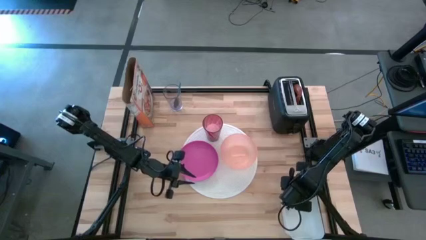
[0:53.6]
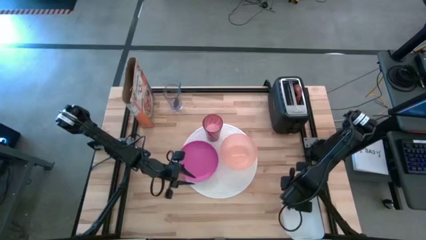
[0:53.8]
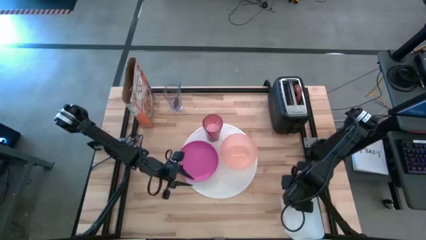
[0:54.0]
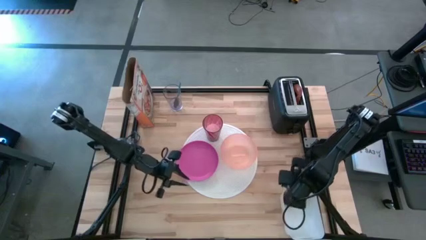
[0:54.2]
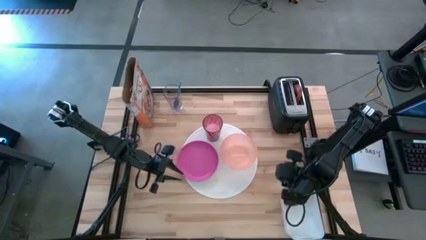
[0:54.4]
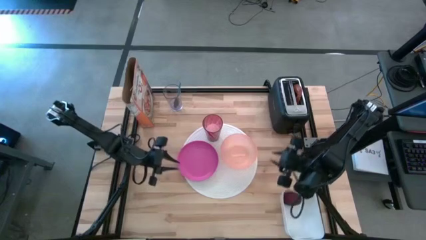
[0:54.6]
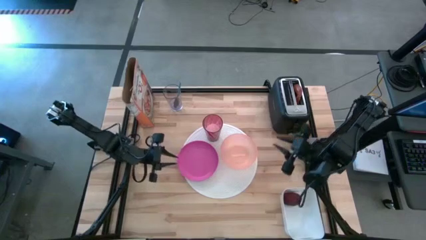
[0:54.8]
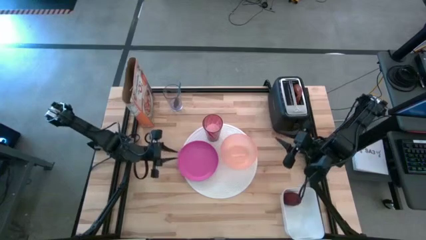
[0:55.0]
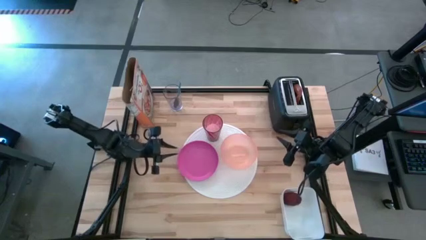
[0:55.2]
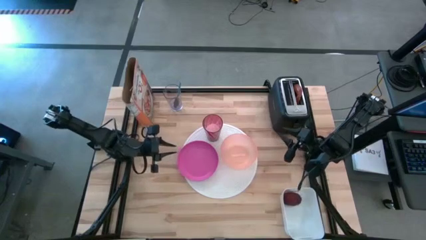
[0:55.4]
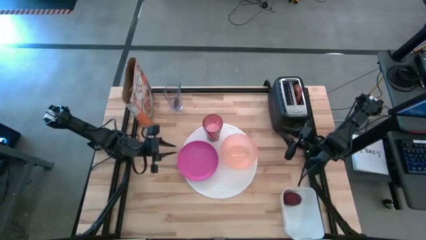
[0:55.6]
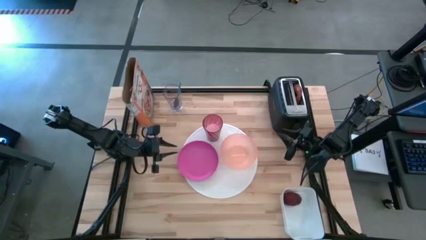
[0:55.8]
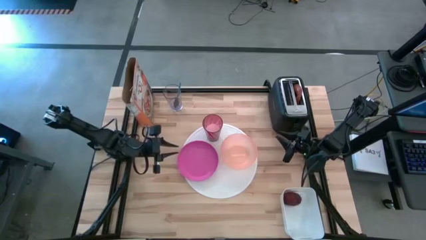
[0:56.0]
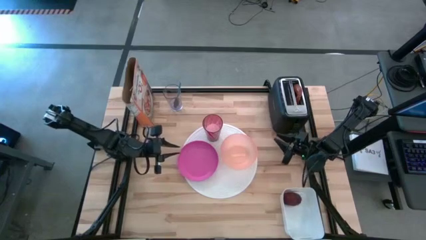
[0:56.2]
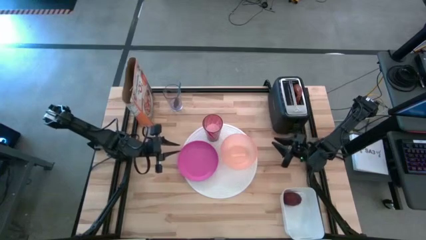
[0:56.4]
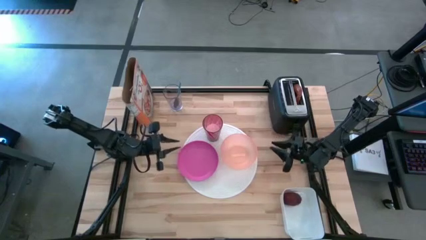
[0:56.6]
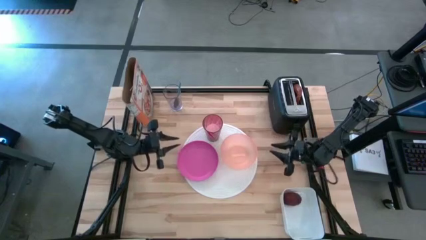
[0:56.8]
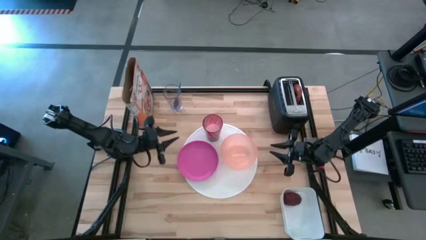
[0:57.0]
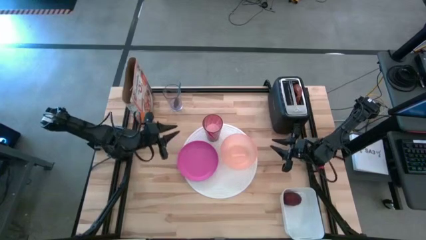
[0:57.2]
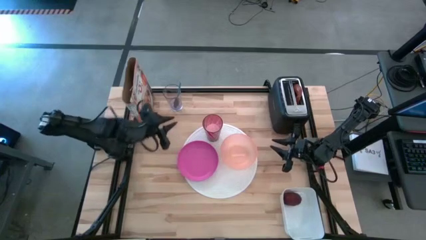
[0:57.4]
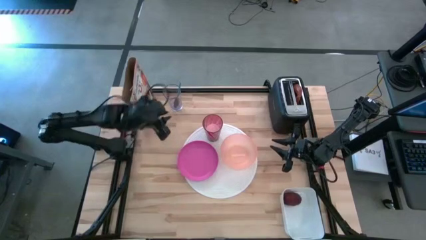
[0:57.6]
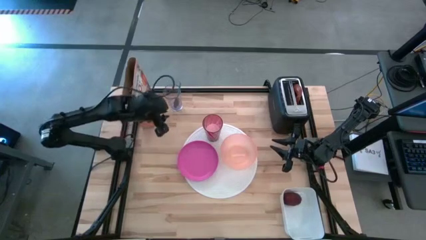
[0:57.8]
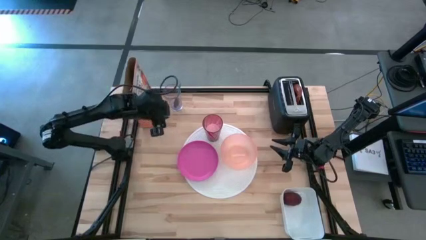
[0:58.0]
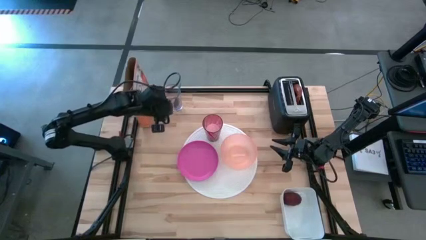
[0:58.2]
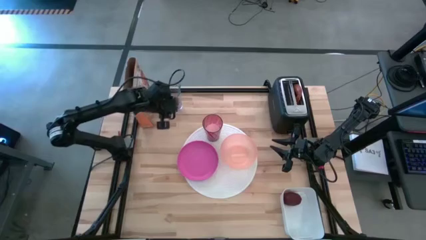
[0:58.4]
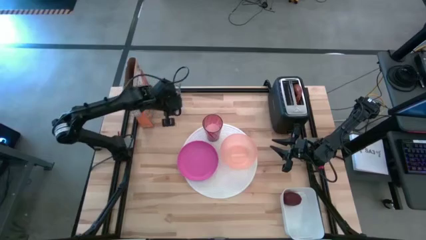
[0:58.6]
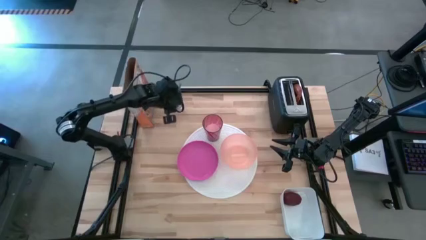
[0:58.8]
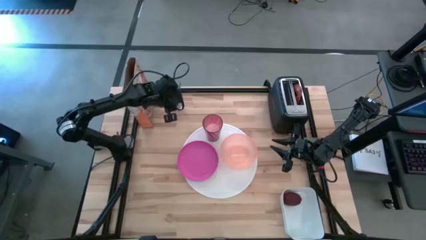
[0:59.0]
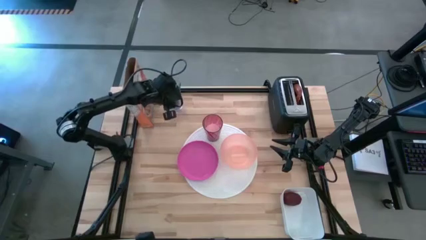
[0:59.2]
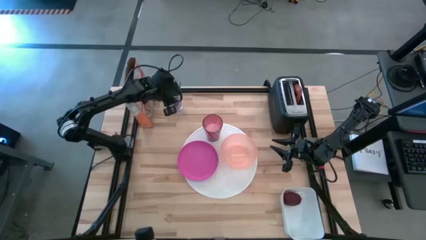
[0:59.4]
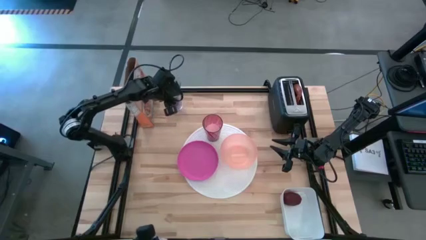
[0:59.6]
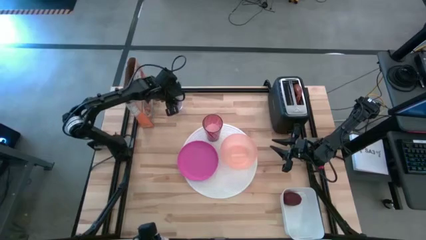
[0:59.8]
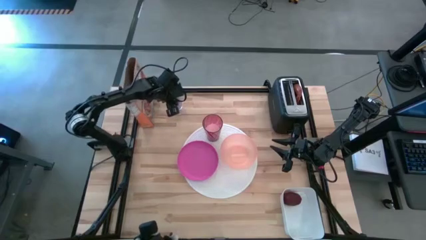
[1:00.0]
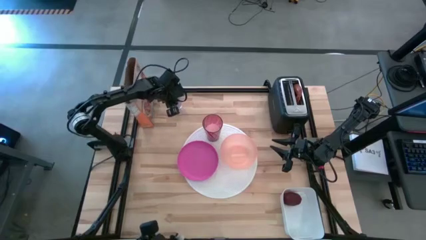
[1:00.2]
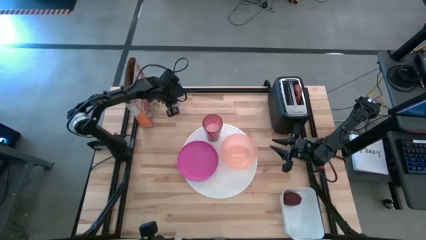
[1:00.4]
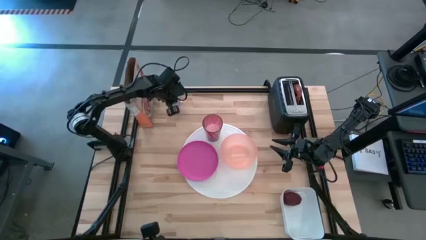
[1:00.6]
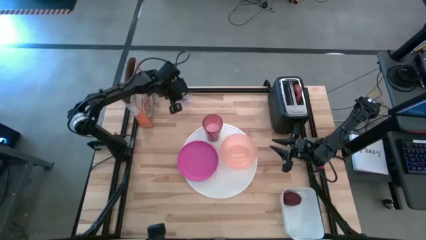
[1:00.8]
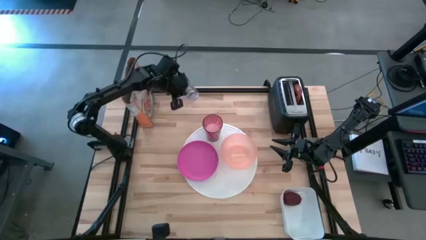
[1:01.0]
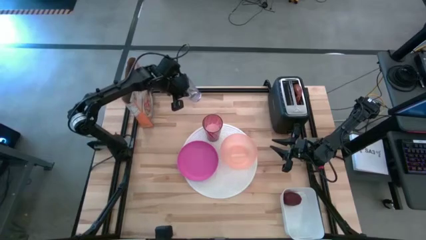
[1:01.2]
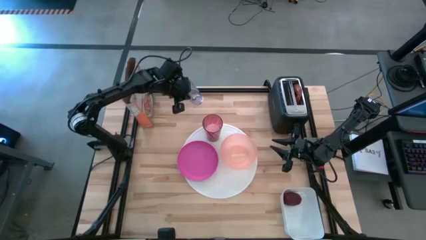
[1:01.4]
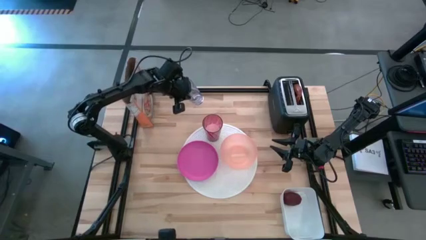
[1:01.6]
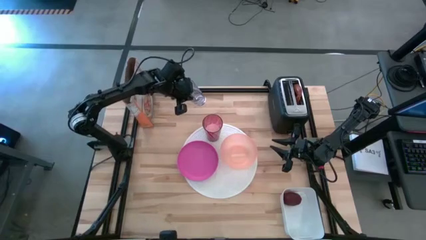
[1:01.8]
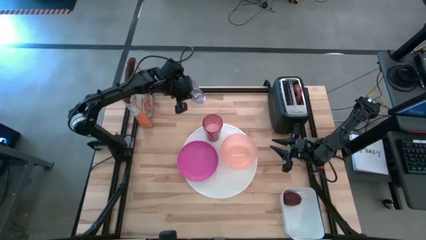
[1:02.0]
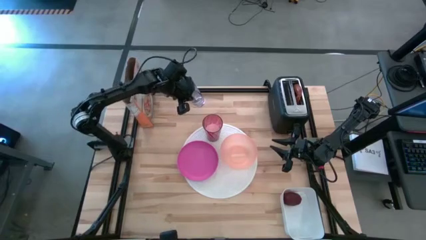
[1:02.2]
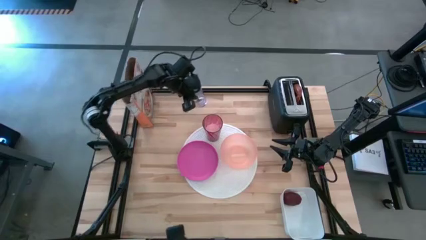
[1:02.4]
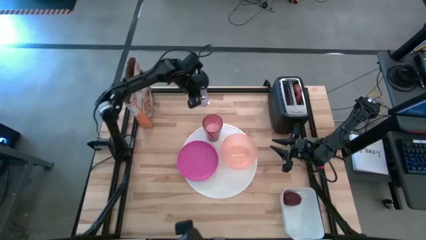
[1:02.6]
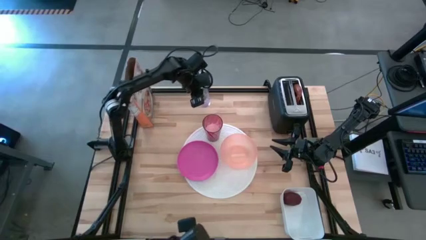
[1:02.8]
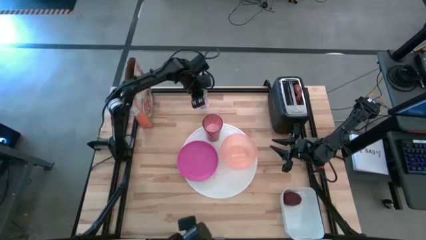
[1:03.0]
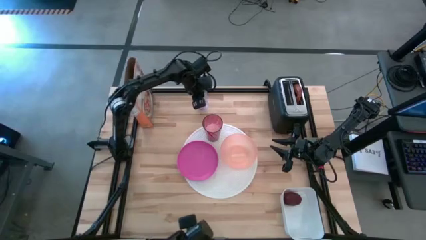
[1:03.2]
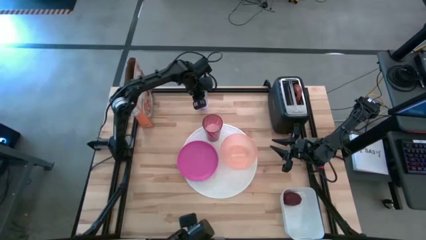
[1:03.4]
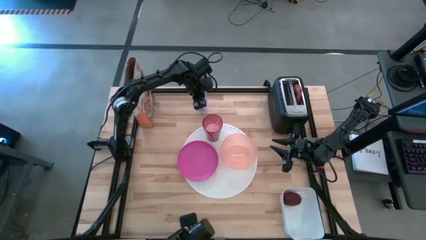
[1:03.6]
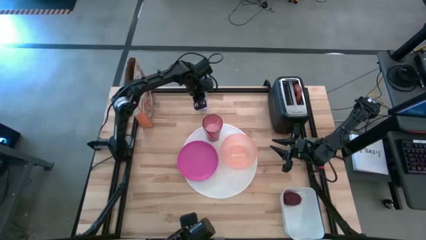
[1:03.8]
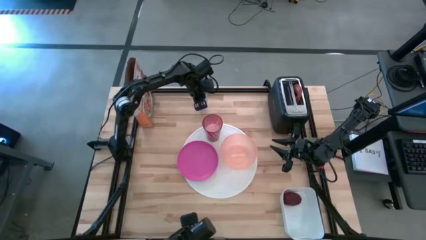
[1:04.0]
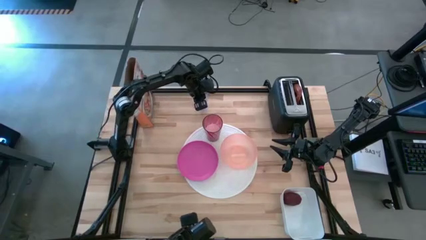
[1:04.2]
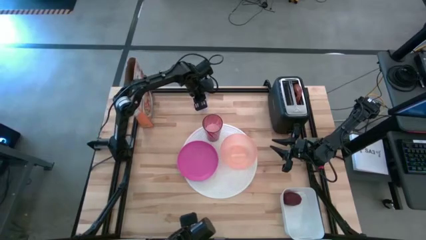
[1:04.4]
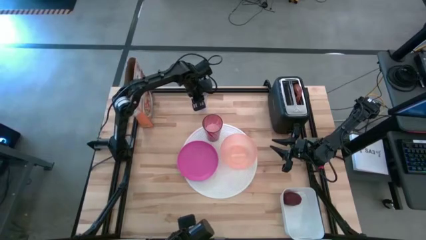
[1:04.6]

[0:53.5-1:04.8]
Task: Arrange a breakfast setting
Adjust the transparent cup
